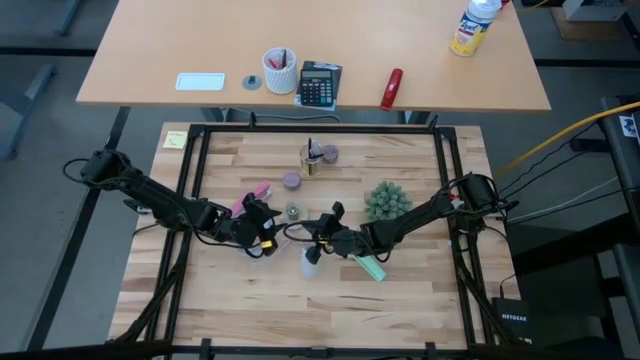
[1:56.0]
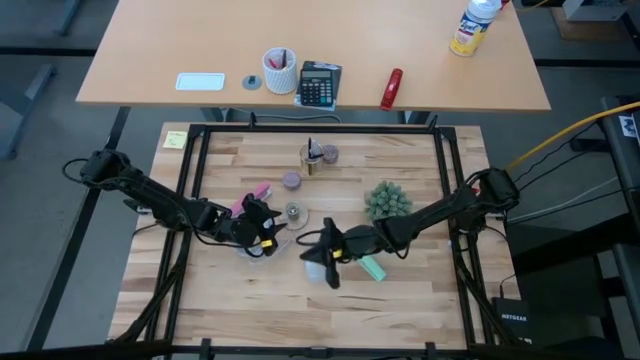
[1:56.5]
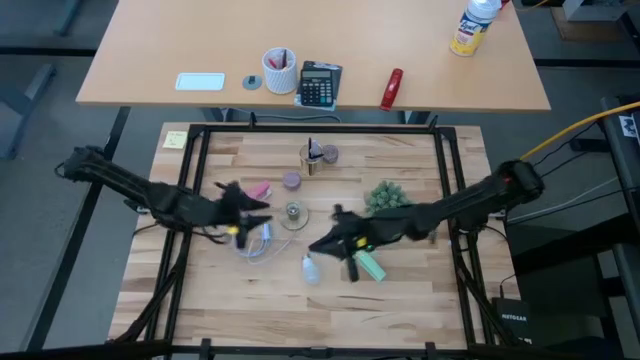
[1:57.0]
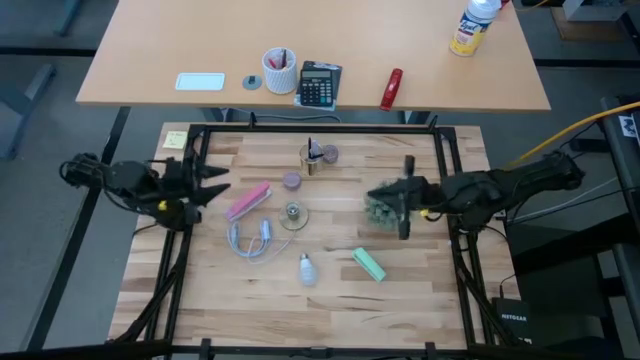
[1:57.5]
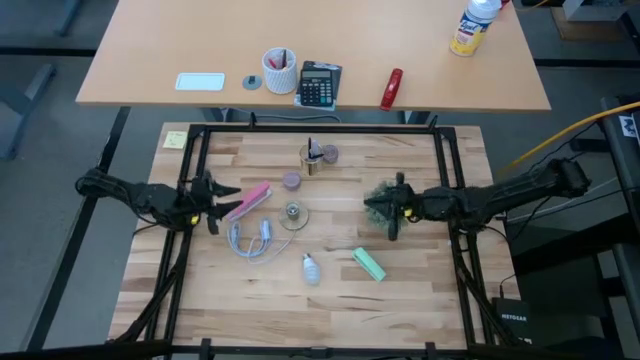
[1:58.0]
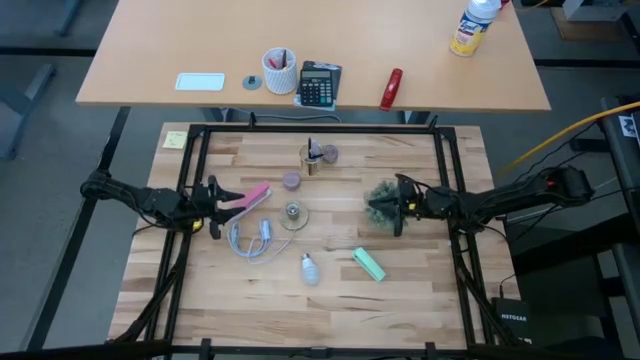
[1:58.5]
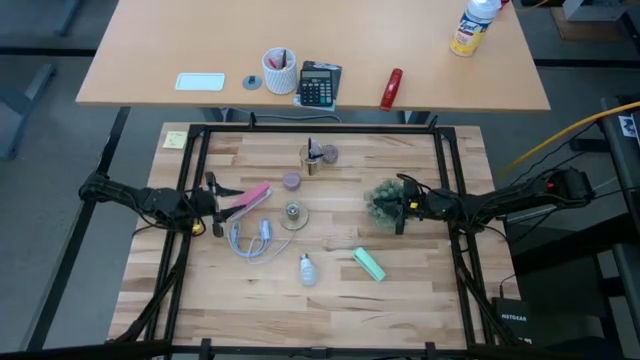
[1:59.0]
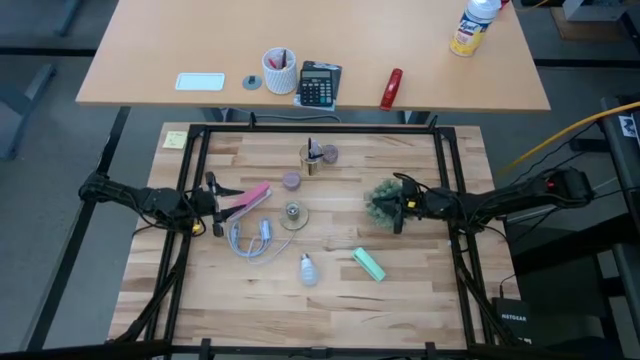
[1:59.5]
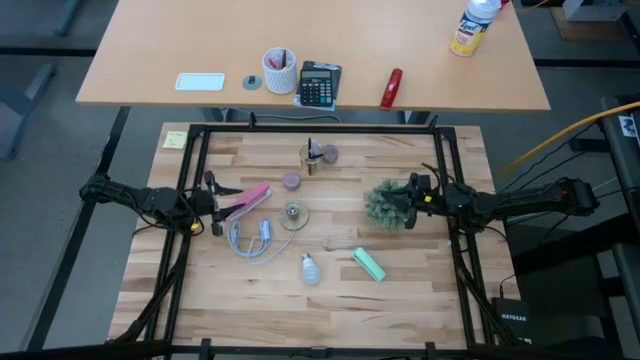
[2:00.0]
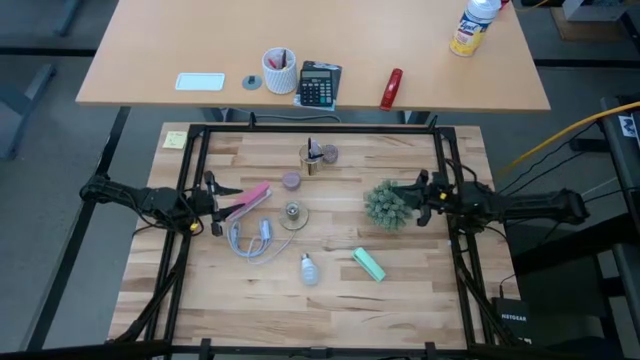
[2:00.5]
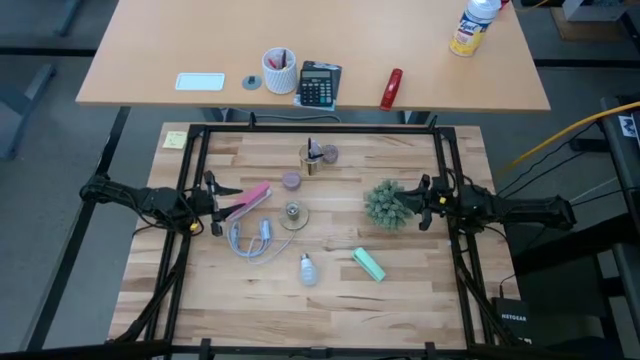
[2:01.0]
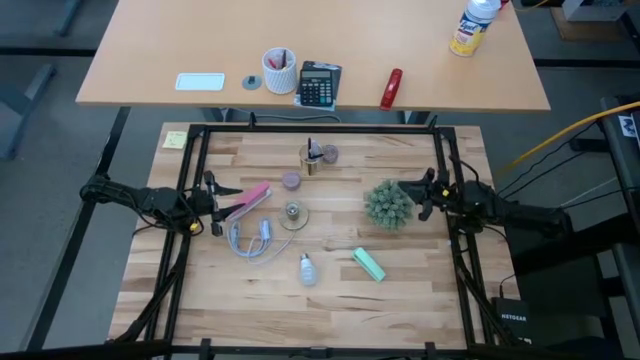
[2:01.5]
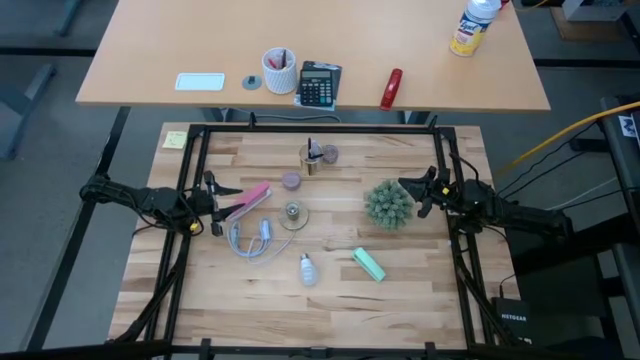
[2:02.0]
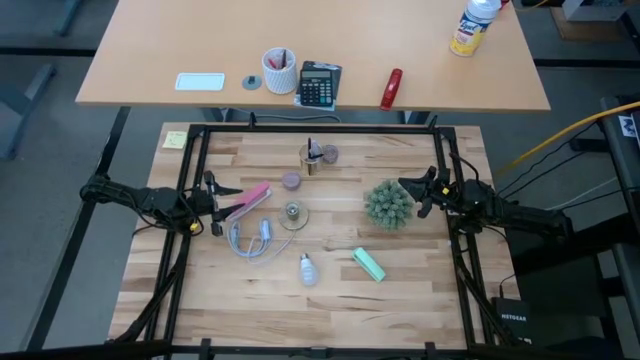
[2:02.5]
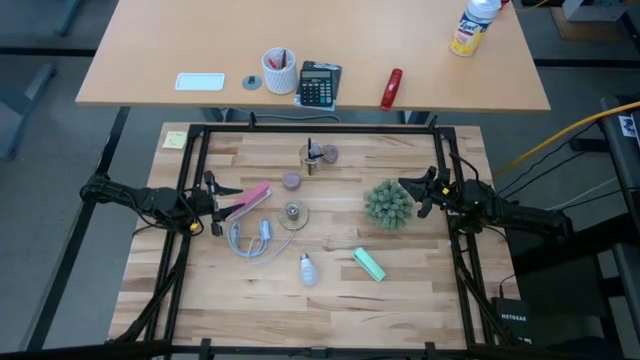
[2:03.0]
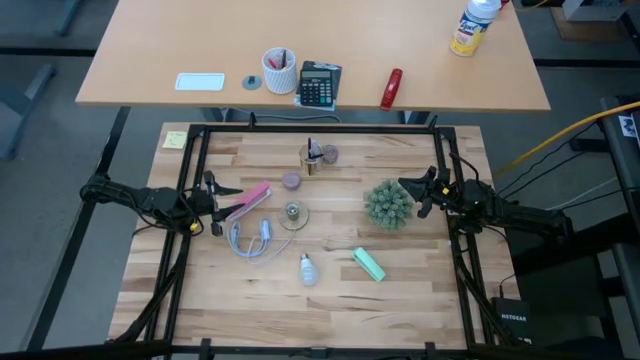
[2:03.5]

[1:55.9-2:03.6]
Task: Screw lightbulb
Return to Home Position

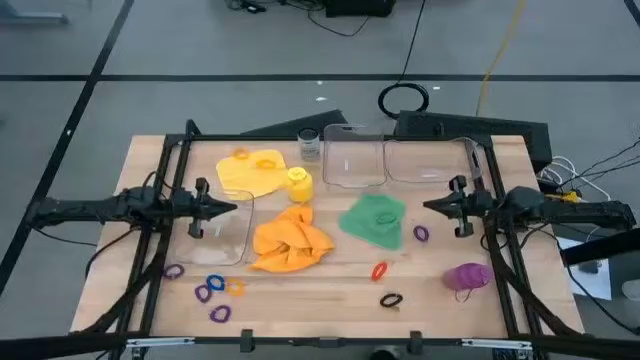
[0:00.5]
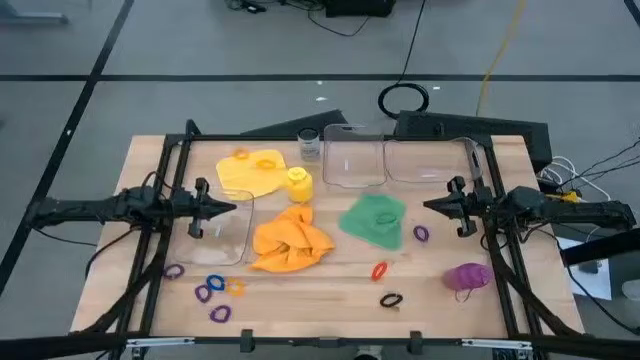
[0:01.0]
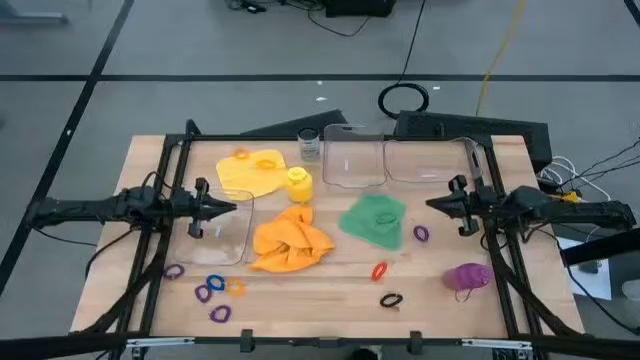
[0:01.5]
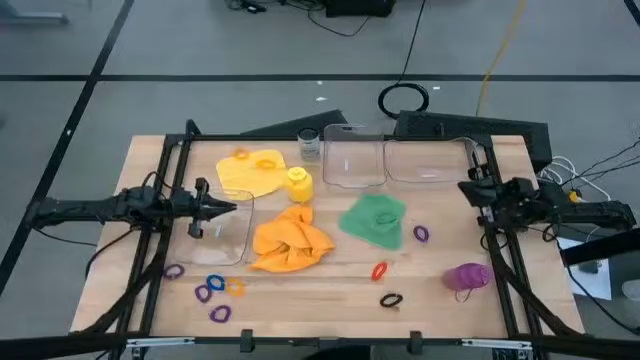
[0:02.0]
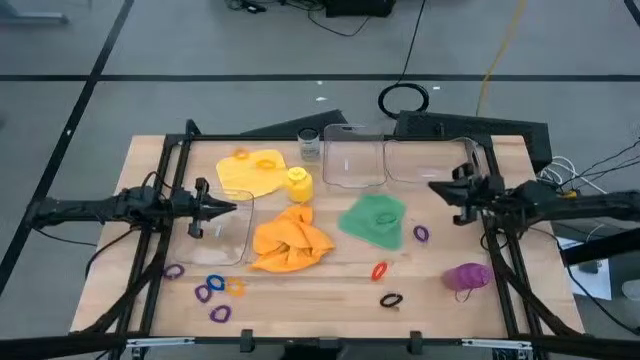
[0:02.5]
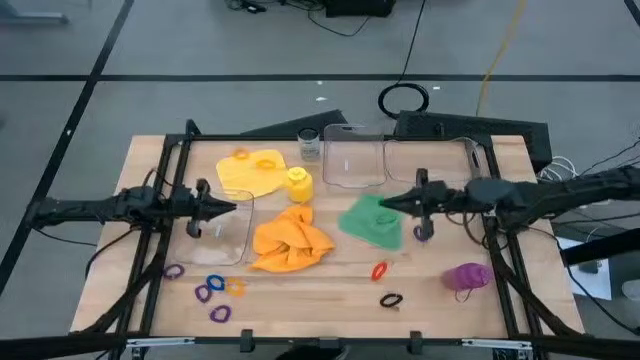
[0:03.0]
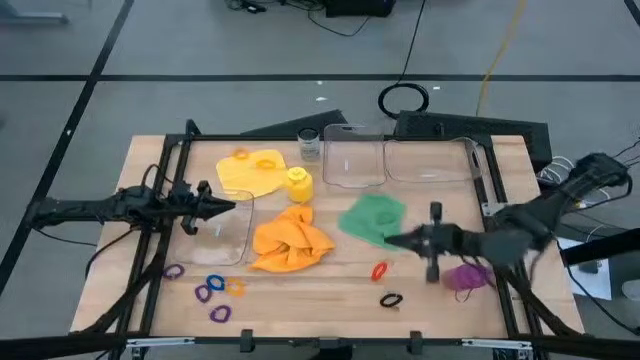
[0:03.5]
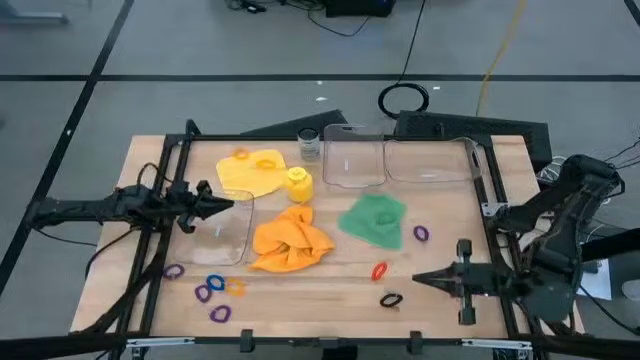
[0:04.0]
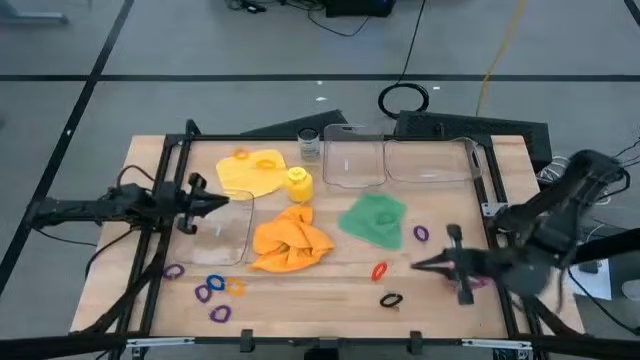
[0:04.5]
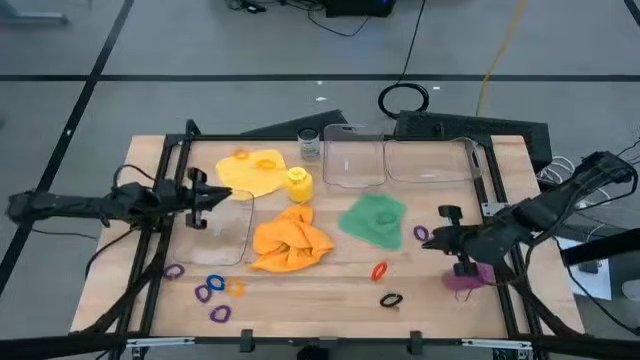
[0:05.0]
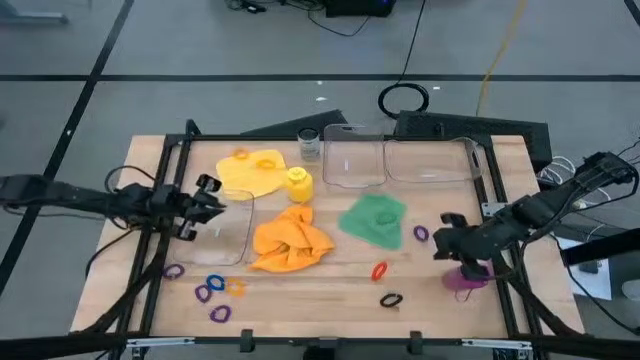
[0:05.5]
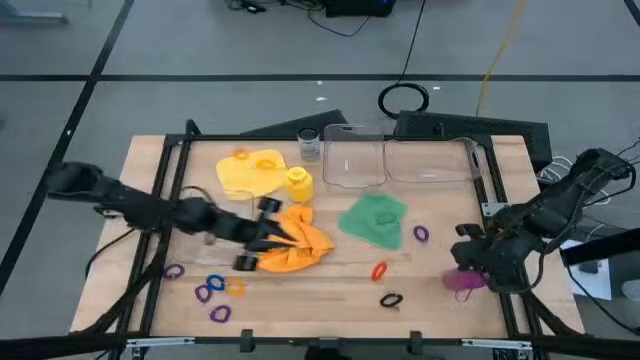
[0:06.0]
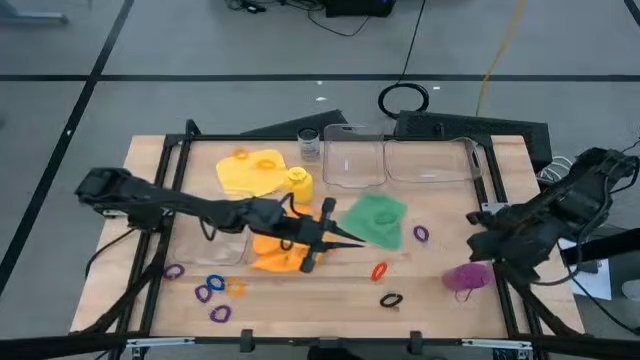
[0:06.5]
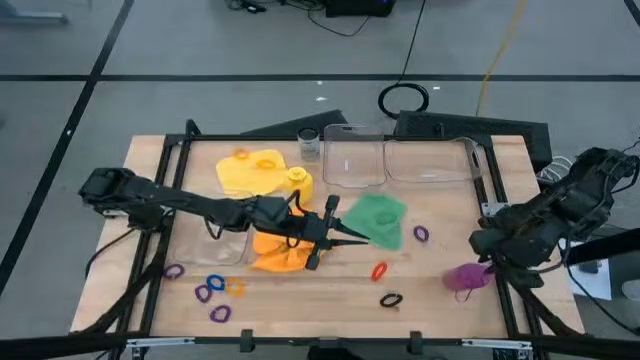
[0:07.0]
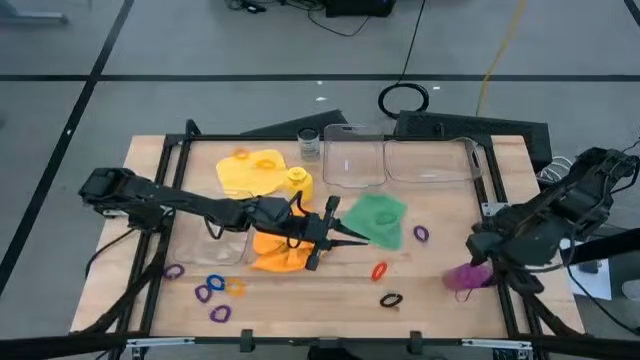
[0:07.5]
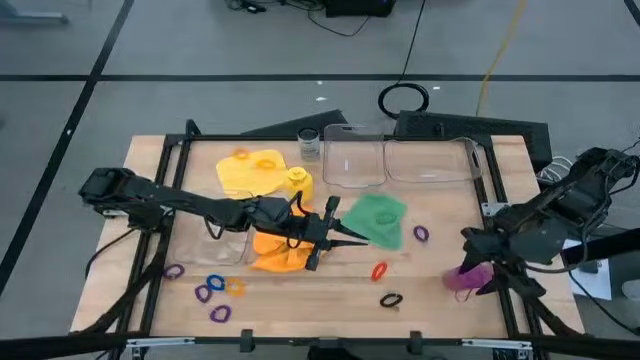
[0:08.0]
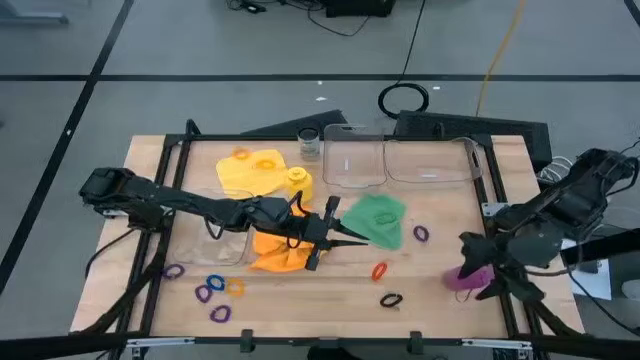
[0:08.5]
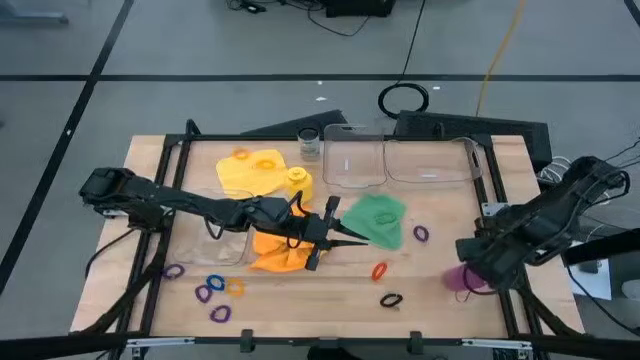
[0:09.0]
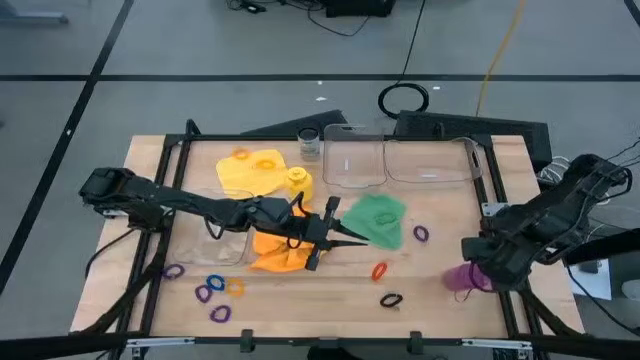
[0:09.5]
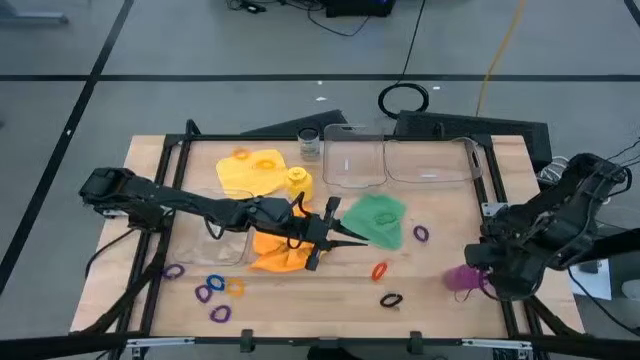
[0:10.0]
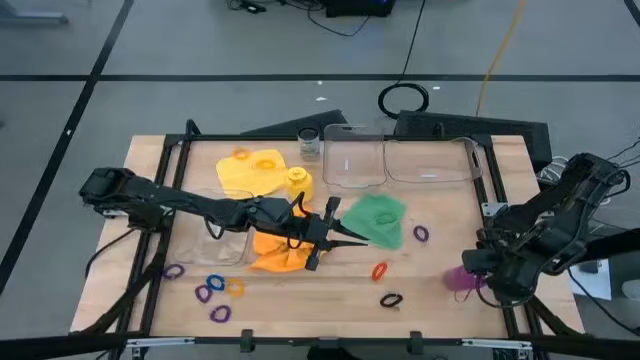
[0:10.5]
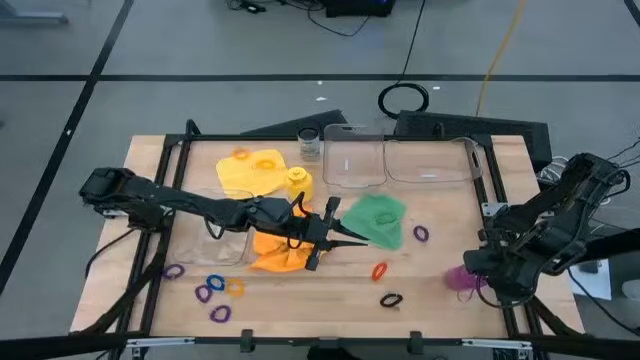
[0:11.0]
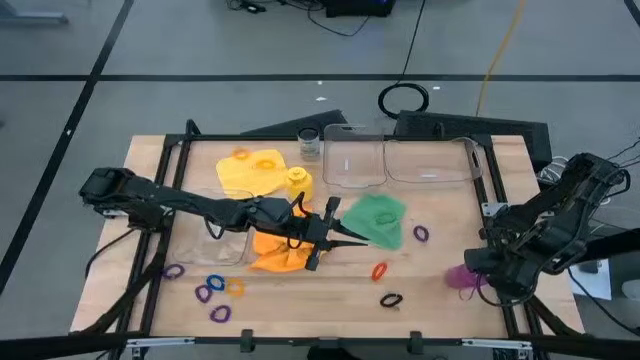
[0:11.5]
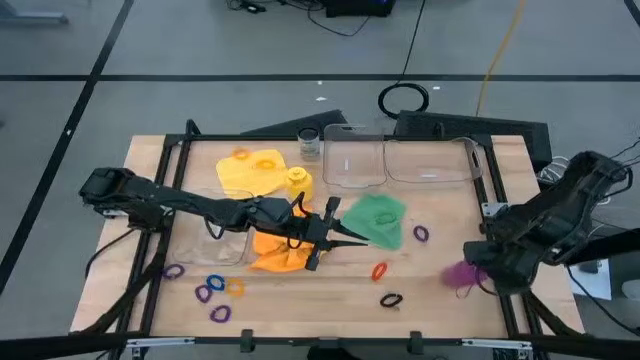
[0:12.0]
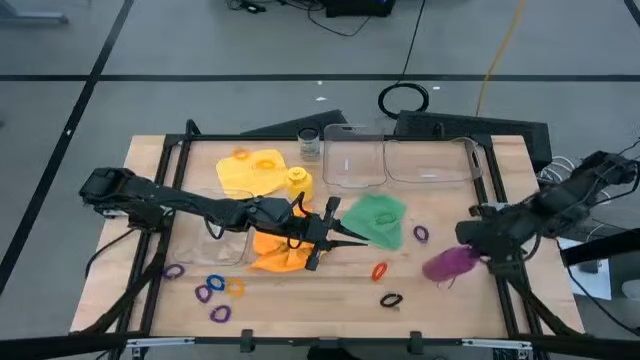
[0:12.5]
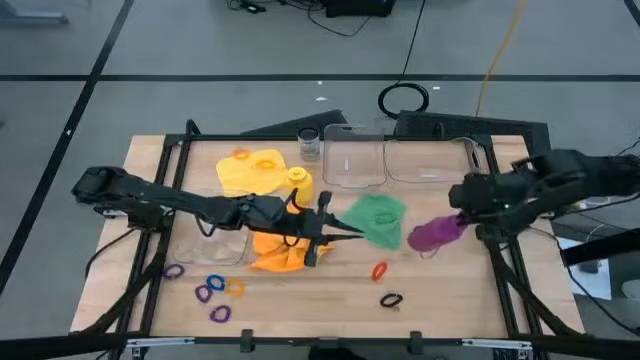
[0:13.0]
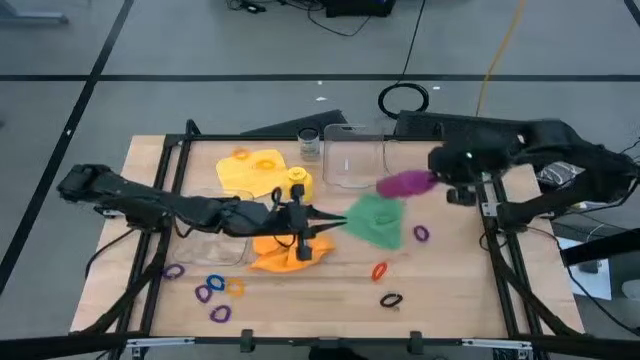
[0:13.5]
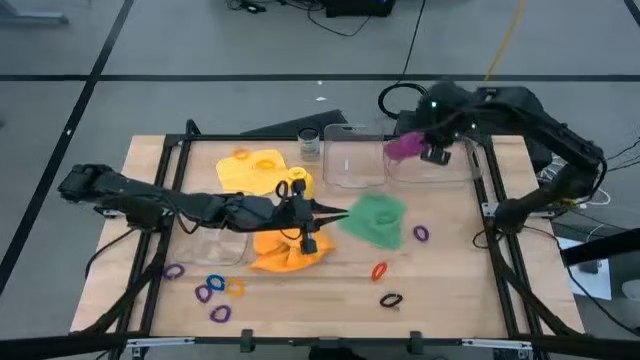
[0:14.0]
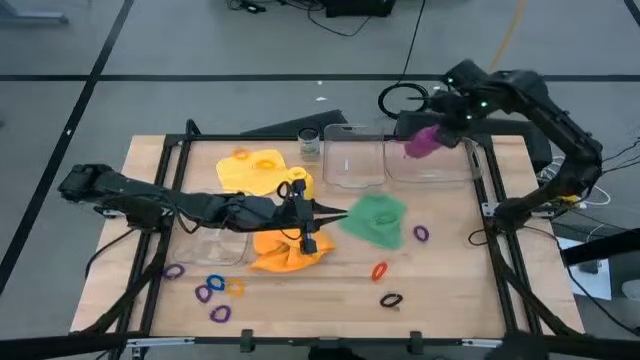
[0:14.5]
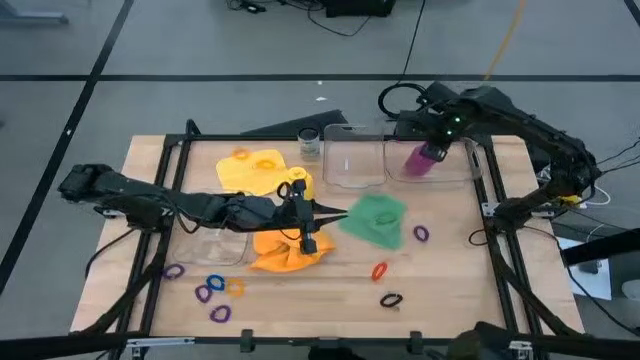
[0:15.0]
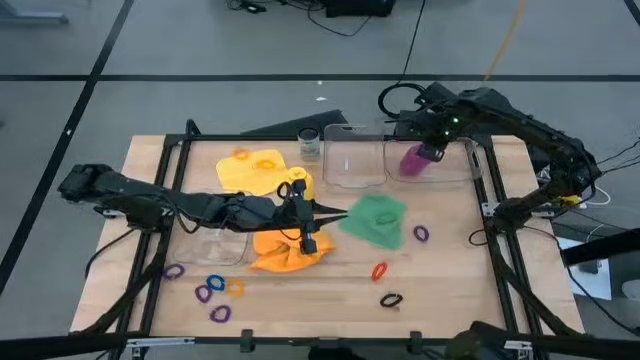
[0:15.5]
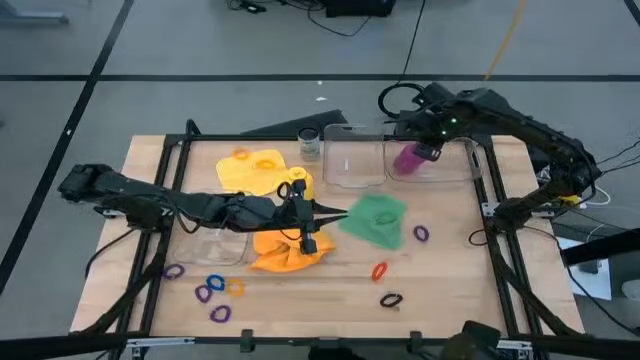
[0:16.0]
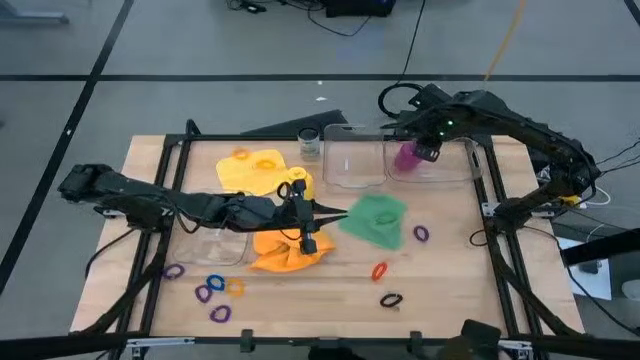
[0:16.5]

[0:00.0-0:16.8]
Task: Pick & Place Sports Items
Put the purple water bottle into the top right transparent bin
